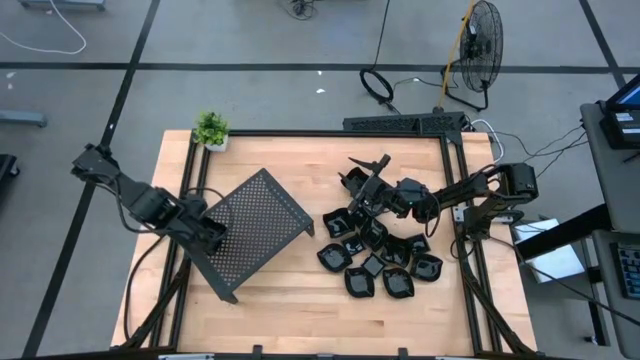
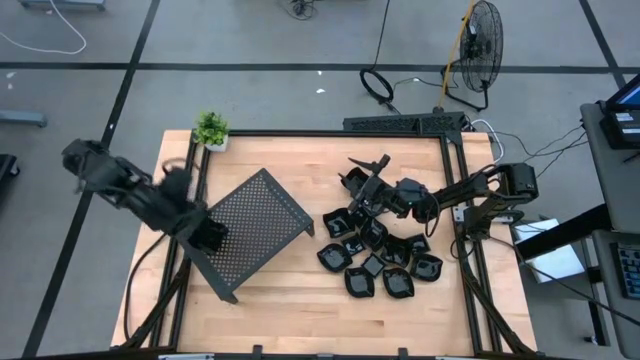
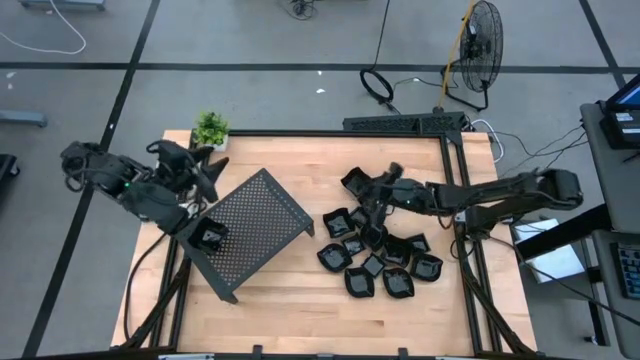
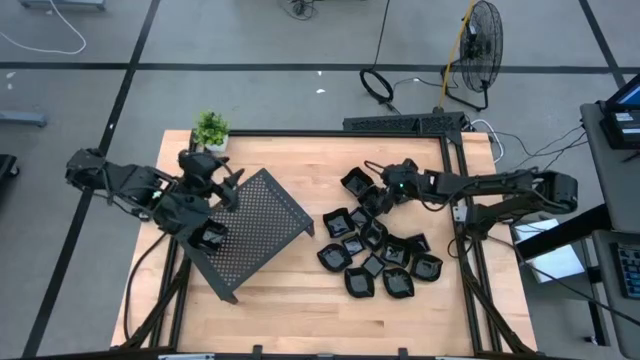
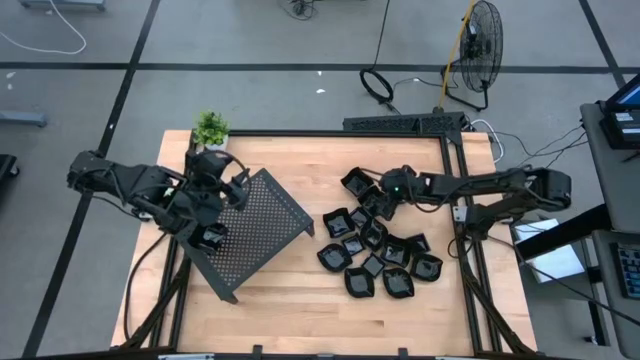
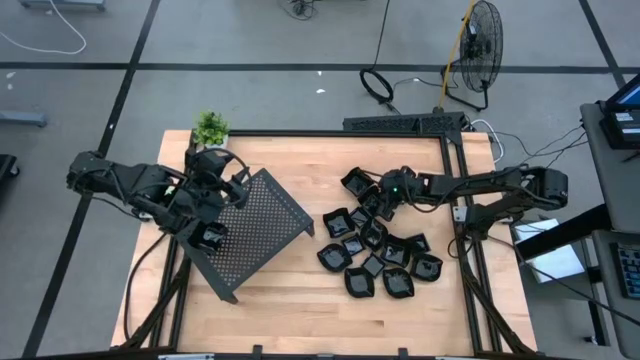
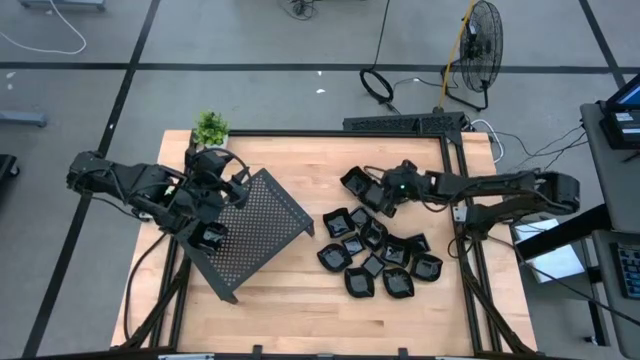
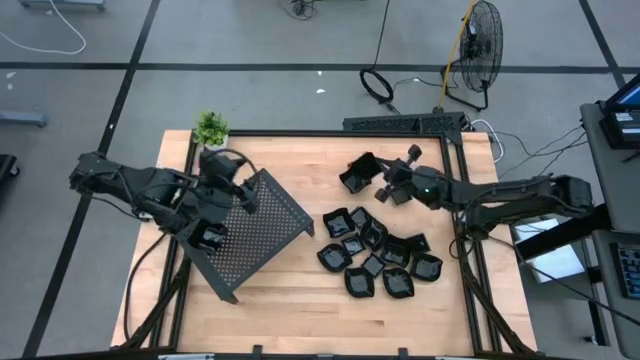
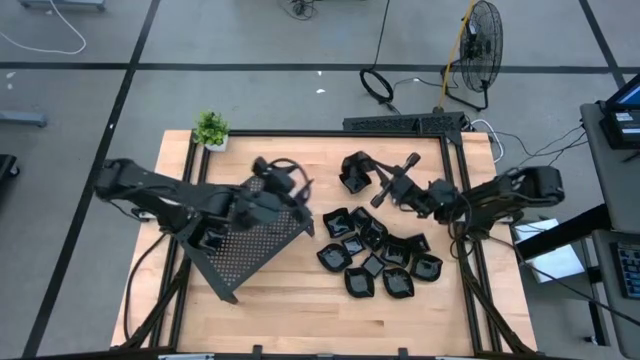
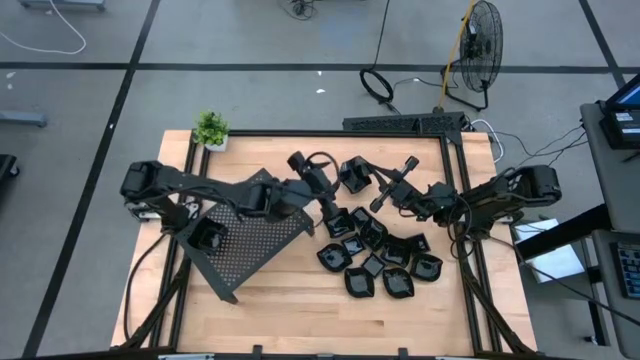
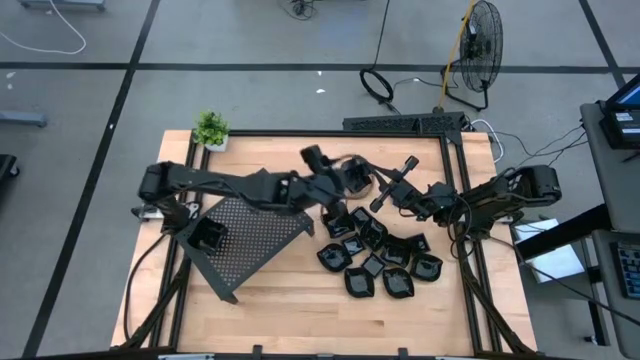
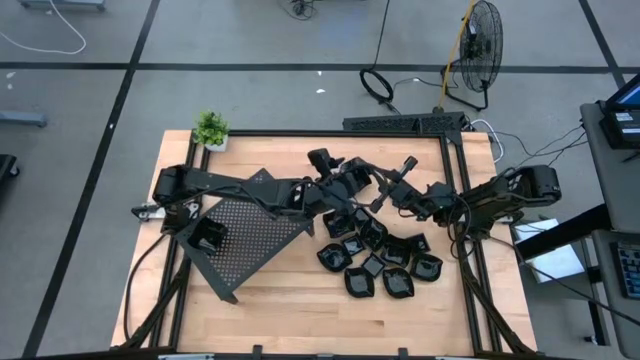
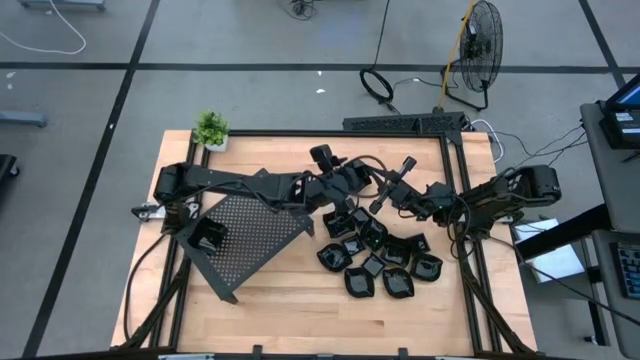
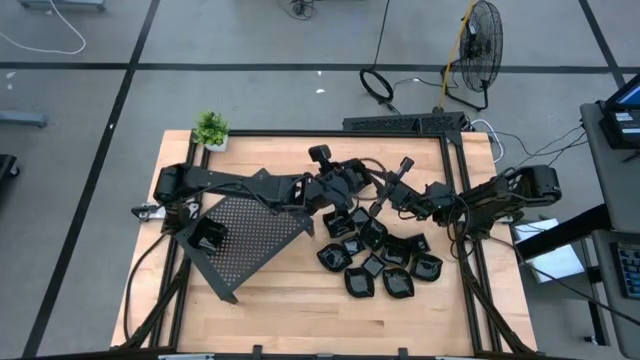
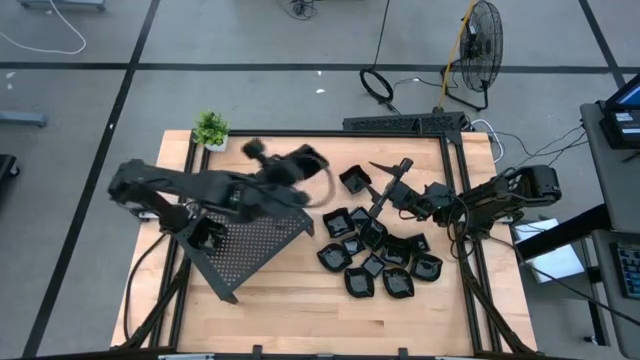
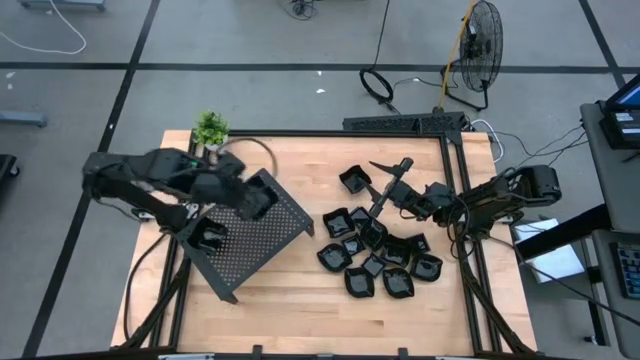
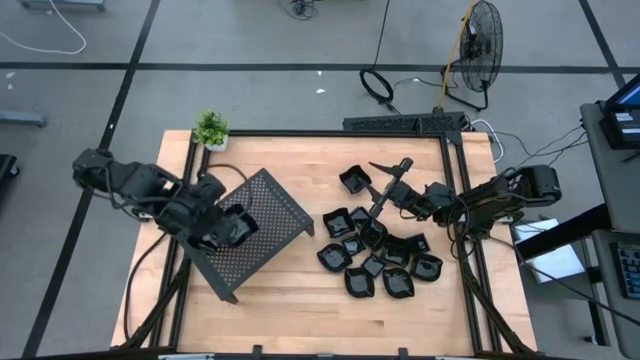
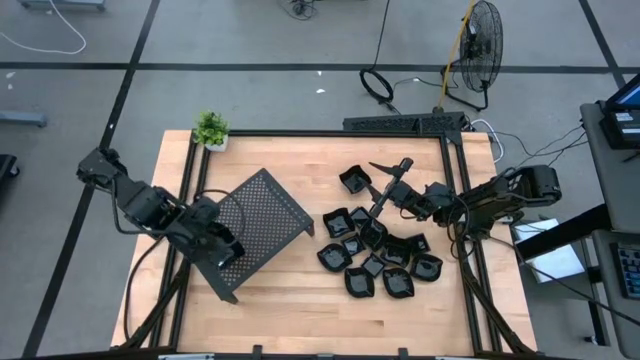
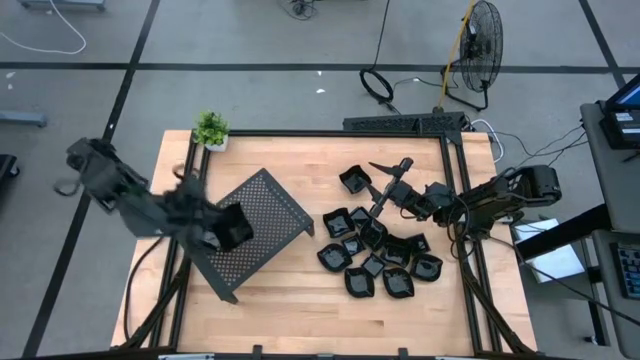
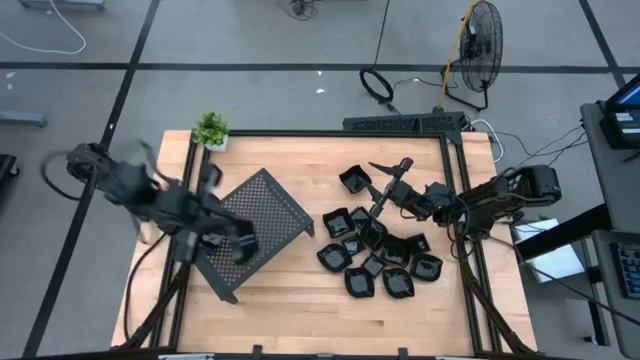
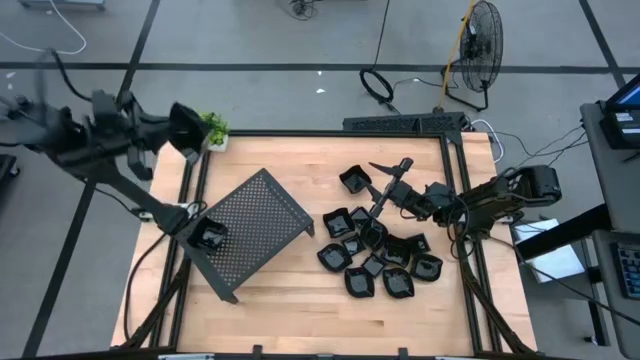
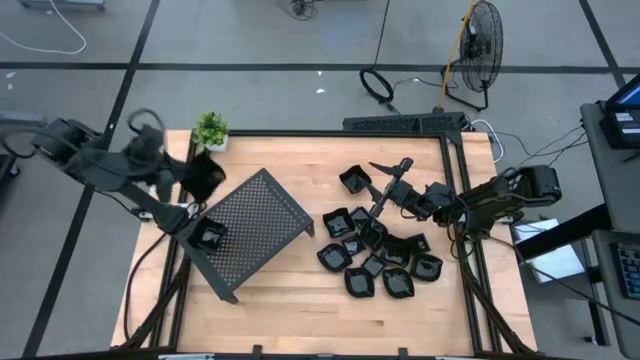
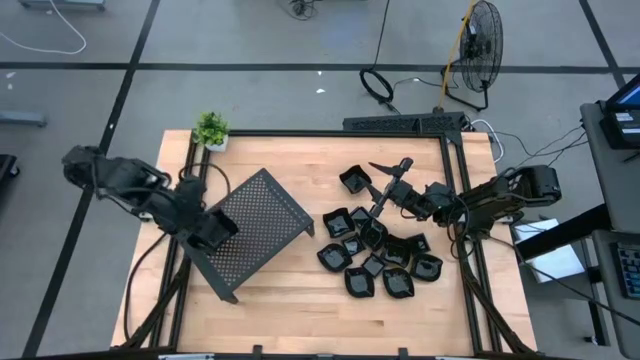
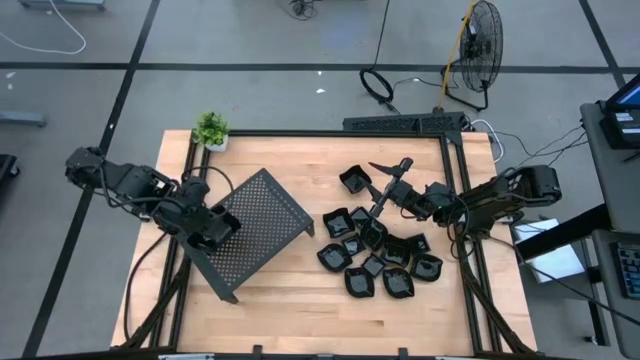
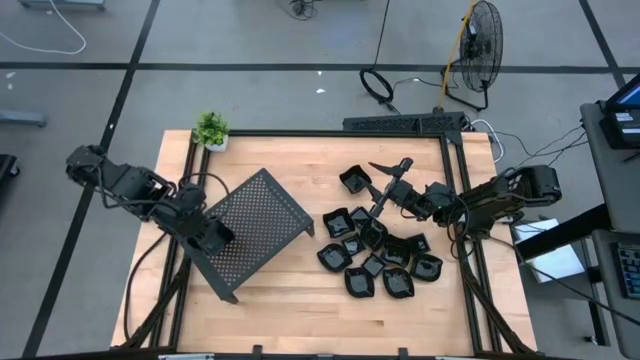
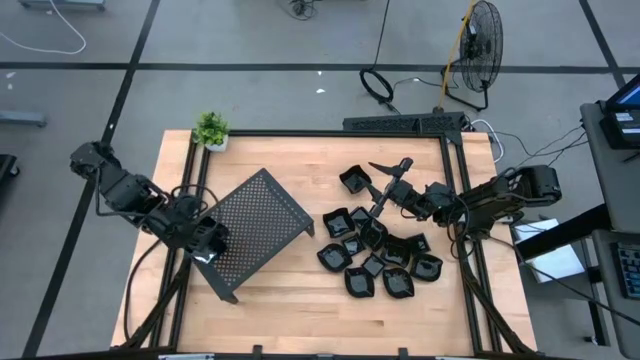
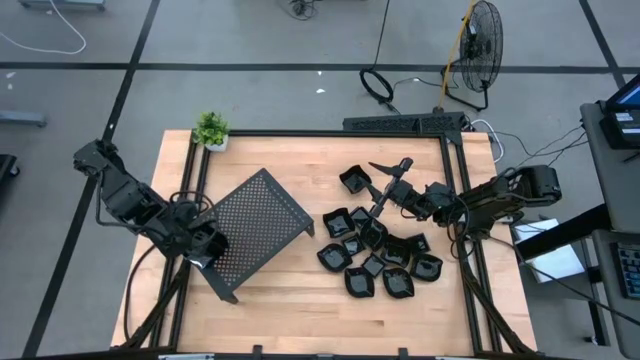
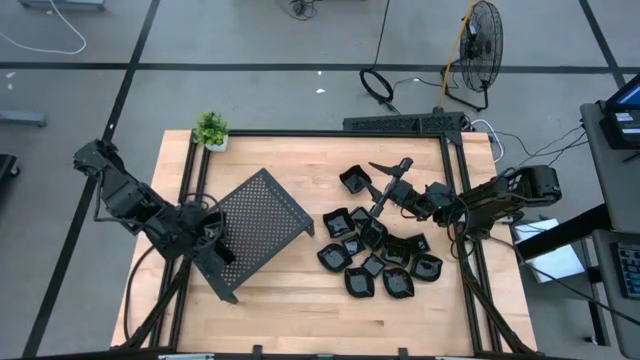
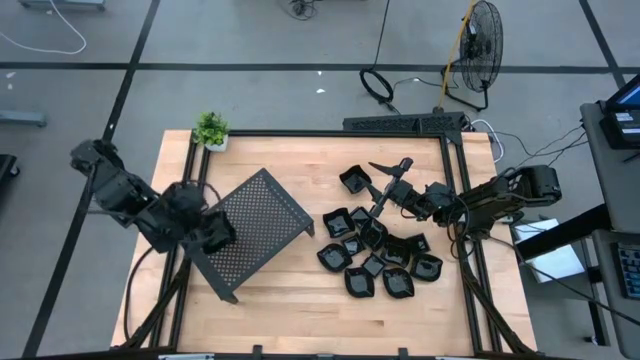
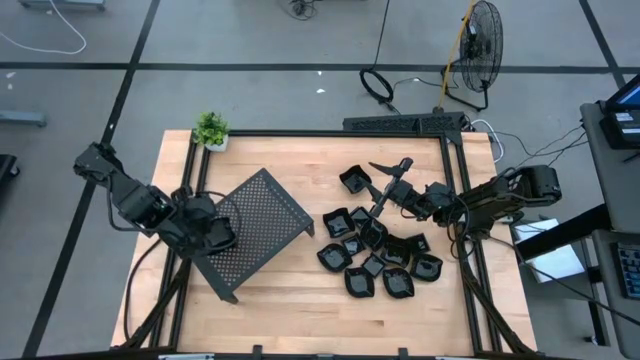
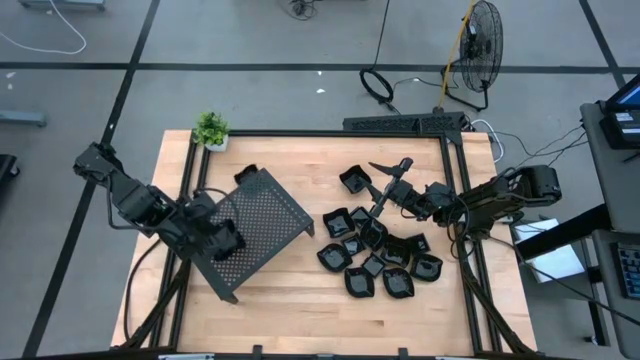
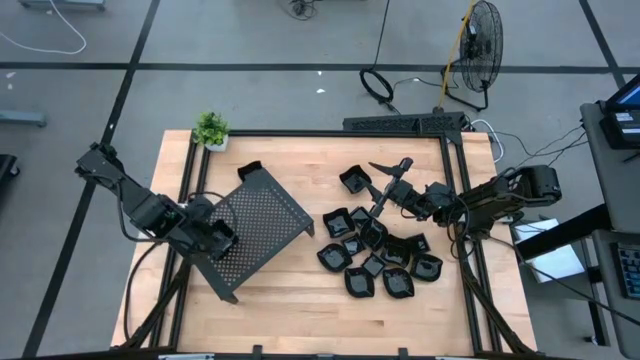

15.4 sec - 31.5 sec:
Task: Pick & Place Mini shaped plates
Put the distorted square plate on the shelf

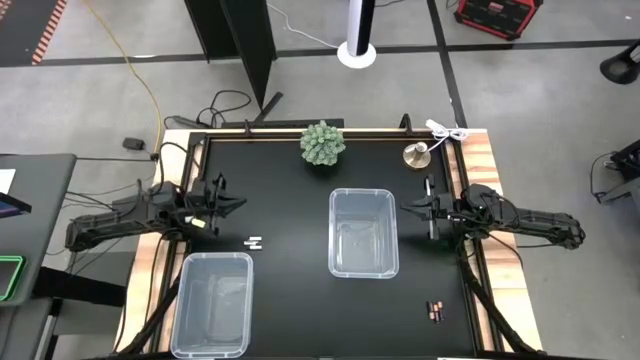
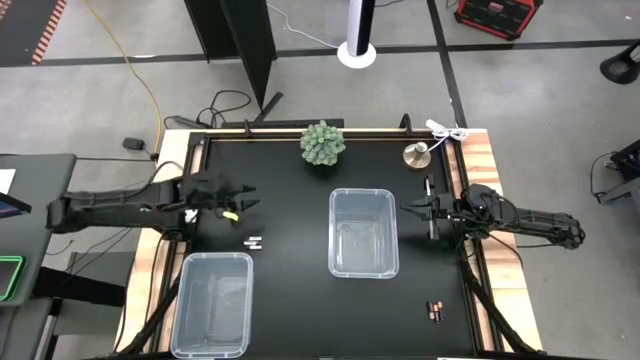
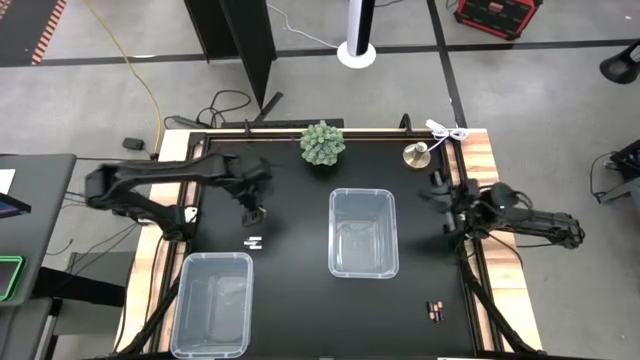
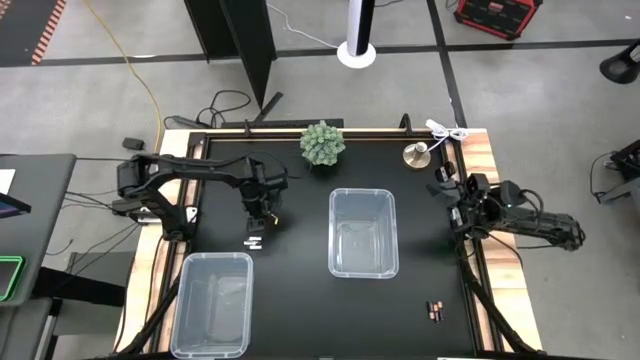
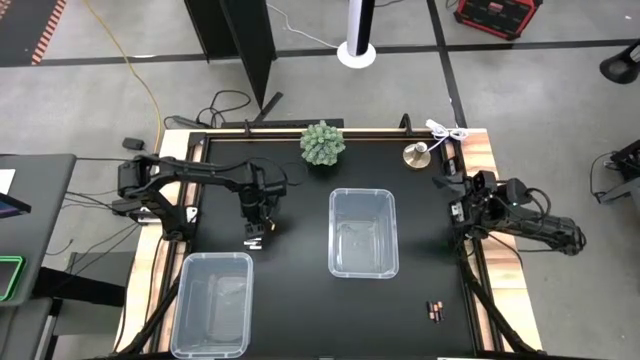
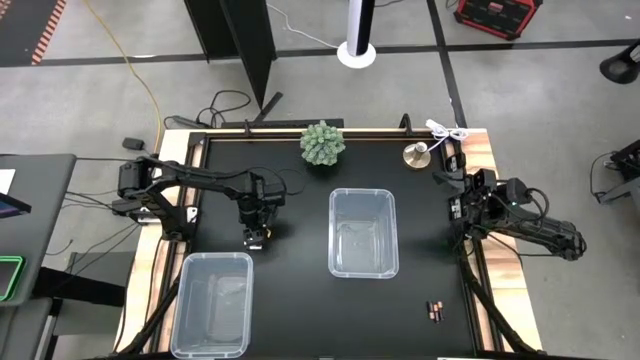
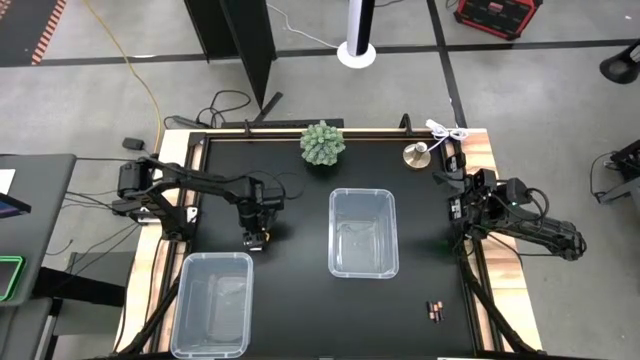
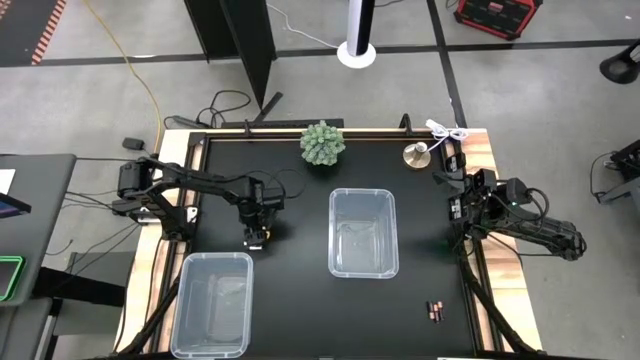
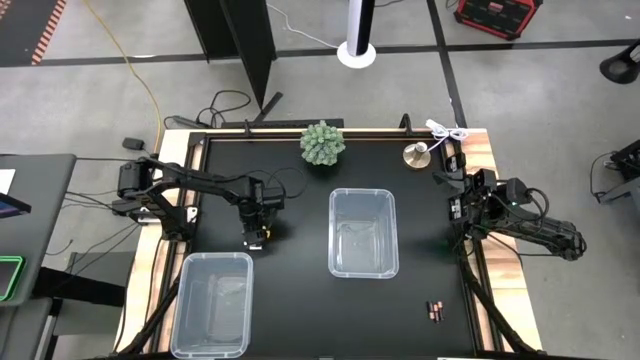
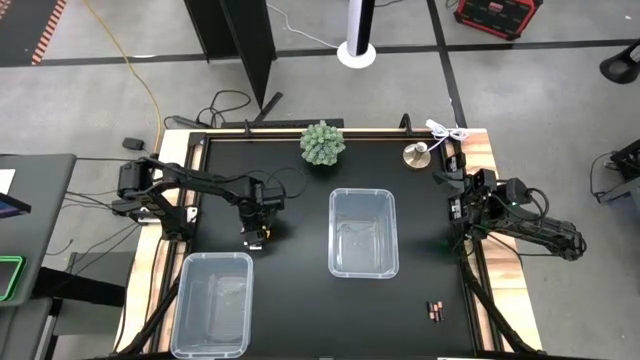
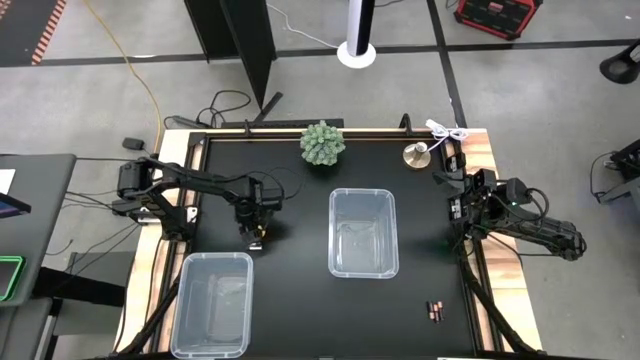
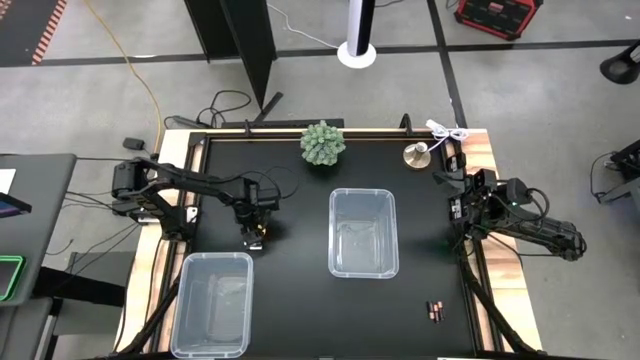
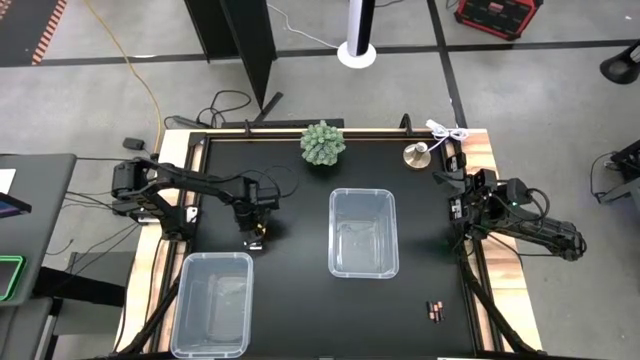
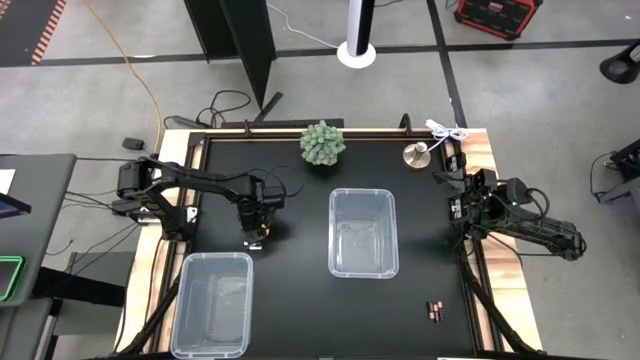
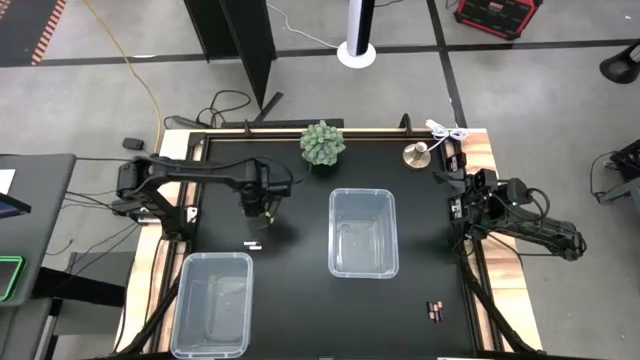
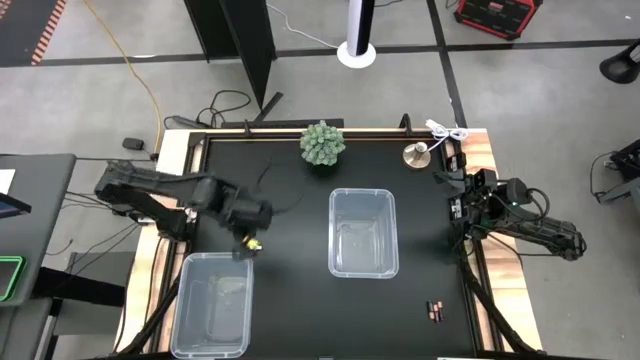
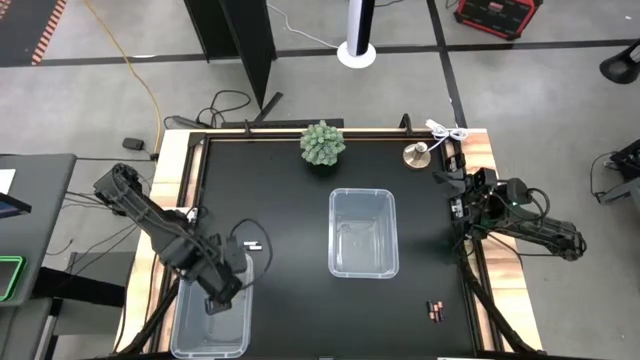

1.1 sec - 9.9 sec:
Task: Sort batteries
Put the top white battery into the bottom transparent bin
